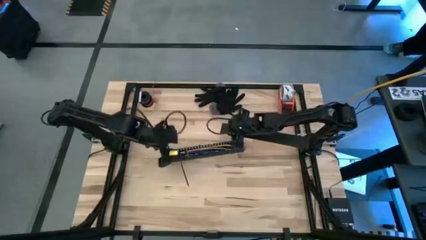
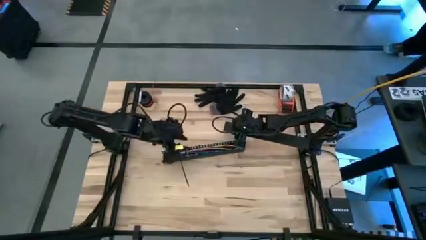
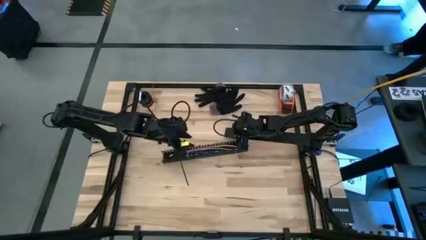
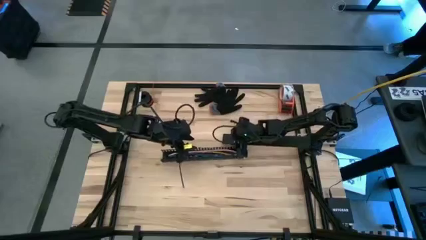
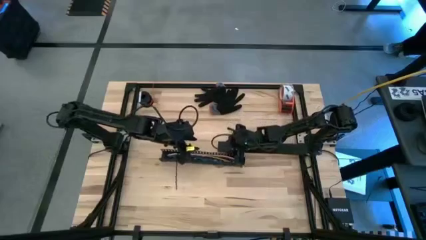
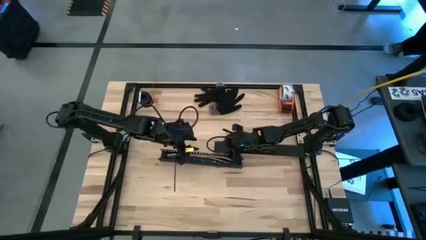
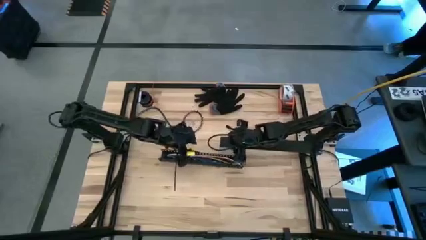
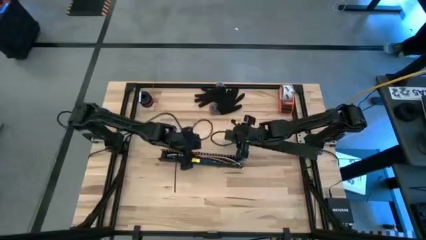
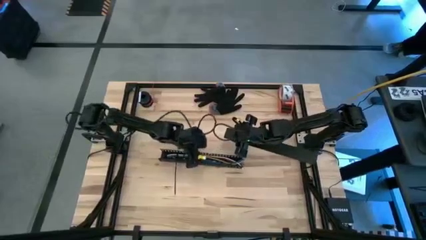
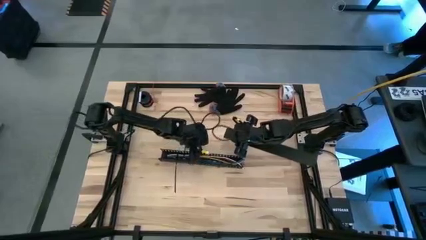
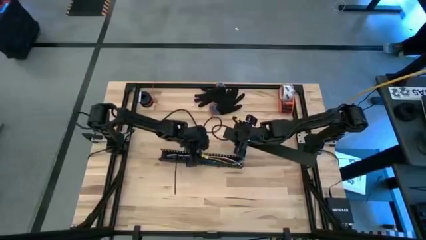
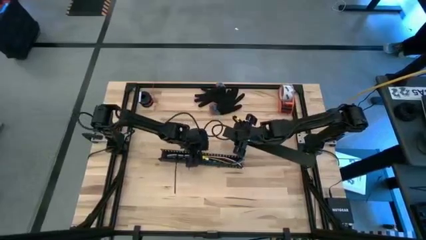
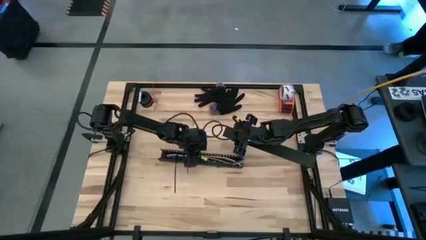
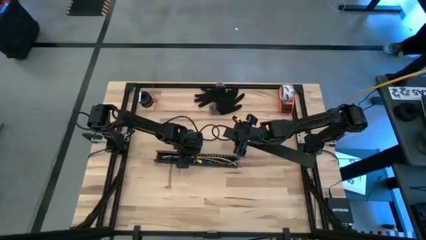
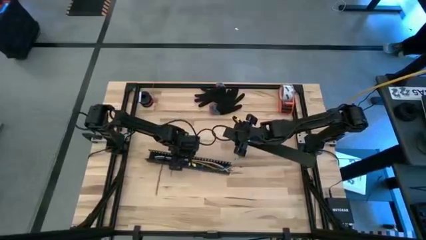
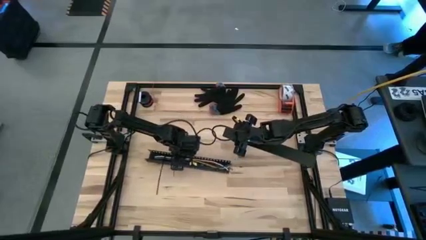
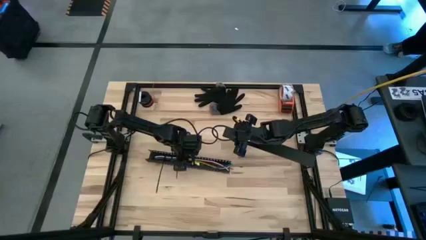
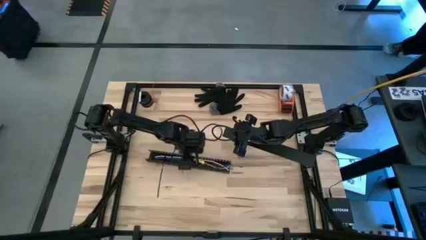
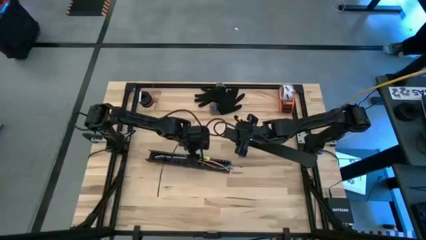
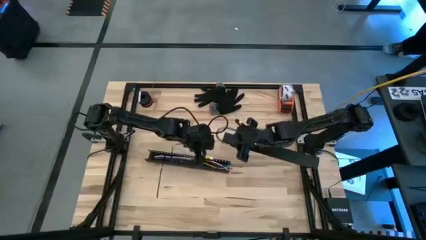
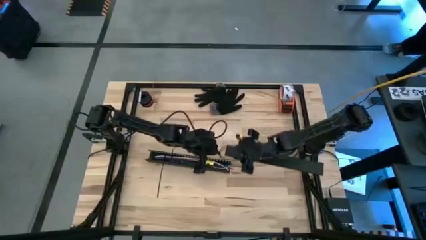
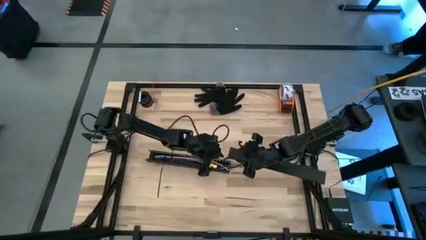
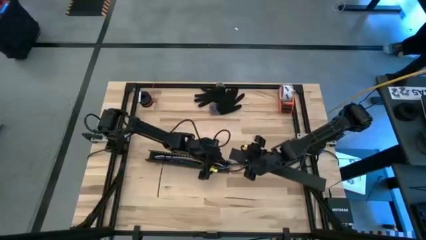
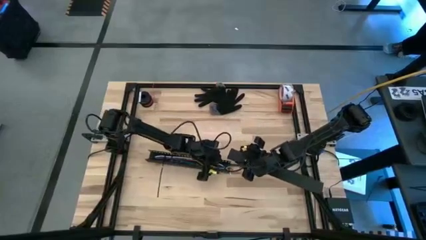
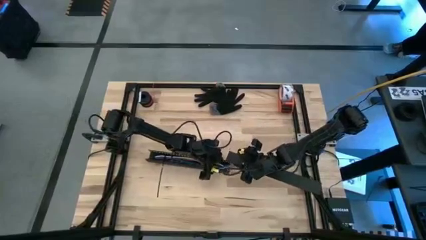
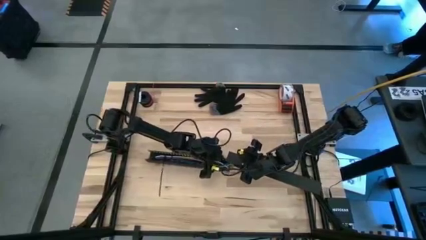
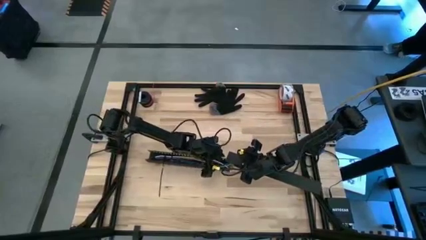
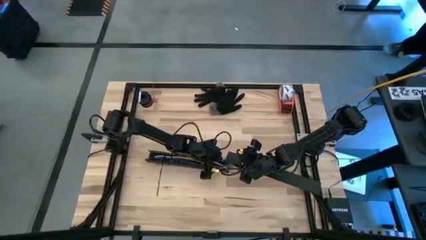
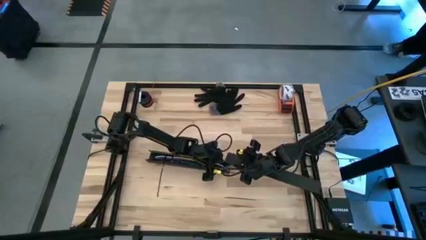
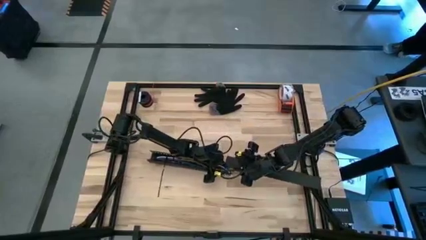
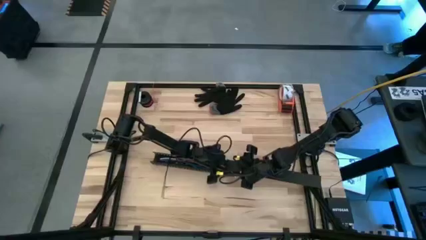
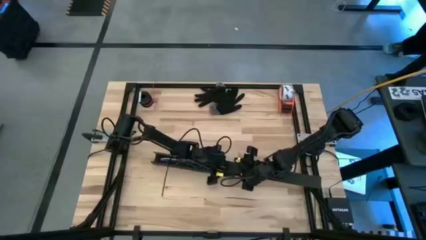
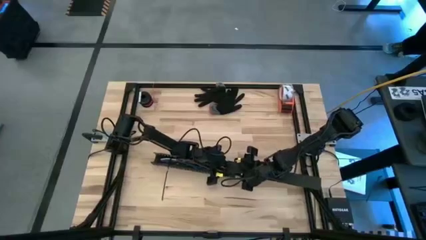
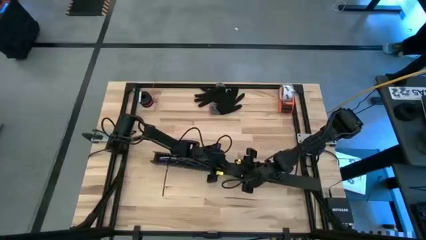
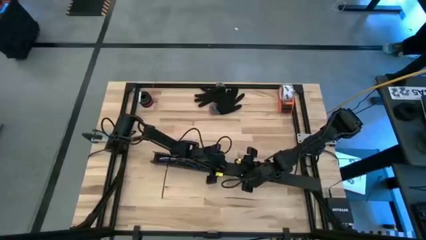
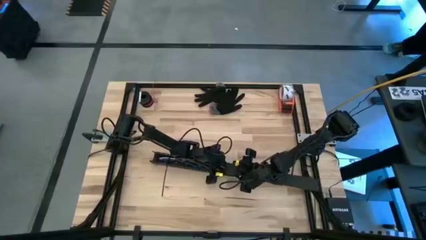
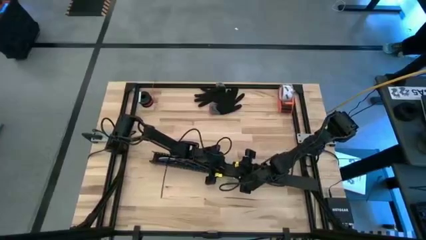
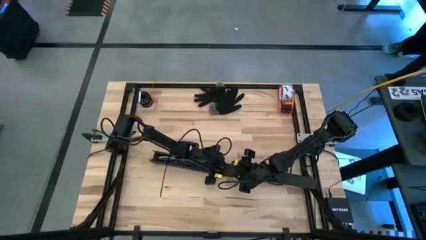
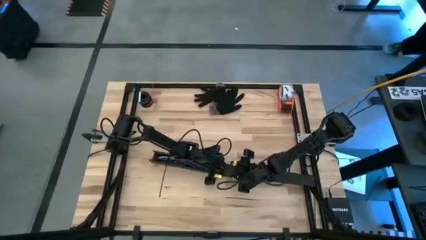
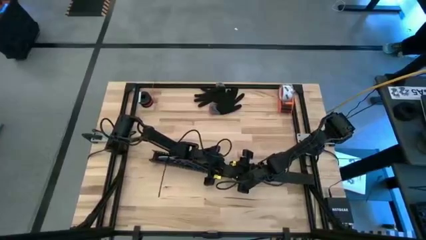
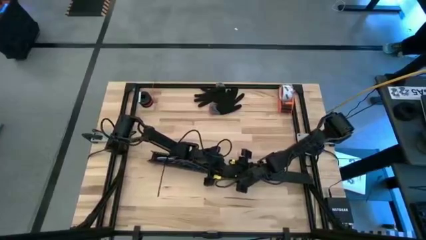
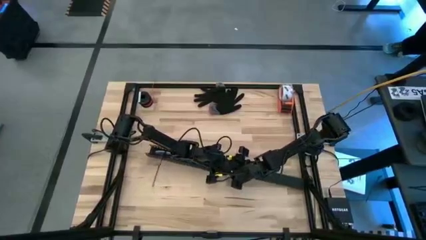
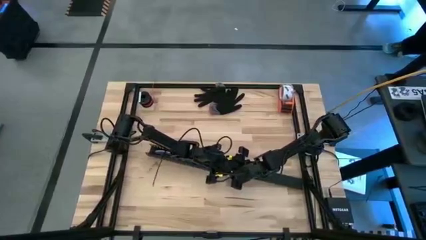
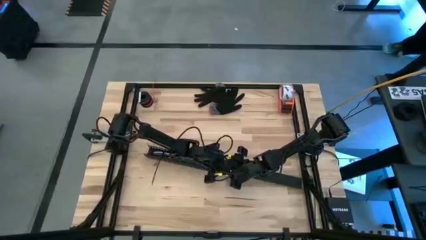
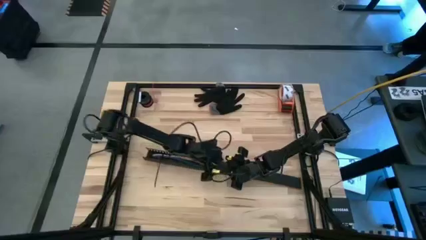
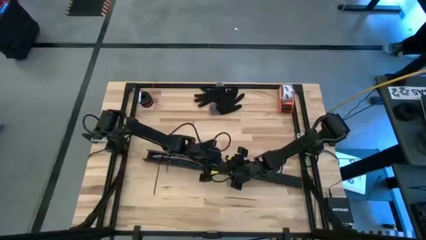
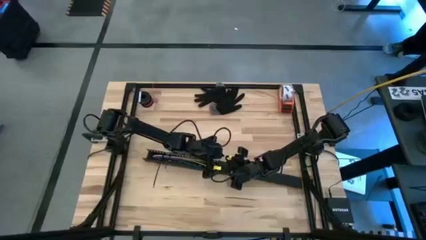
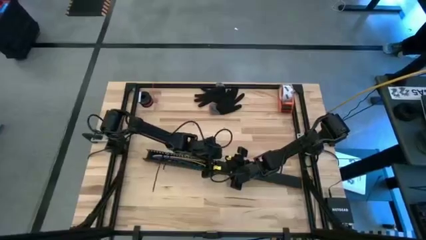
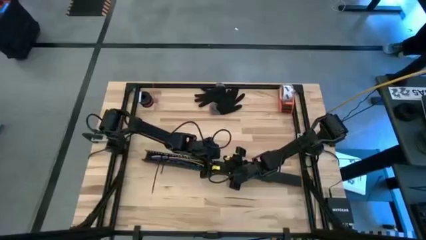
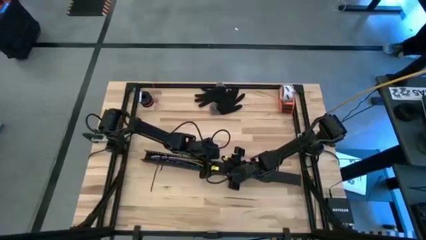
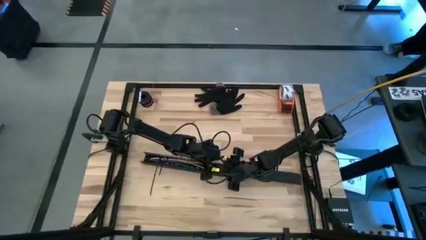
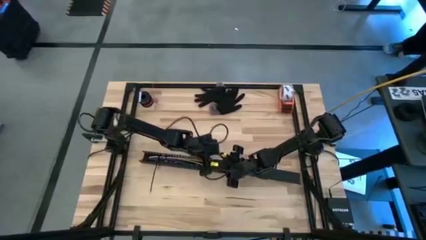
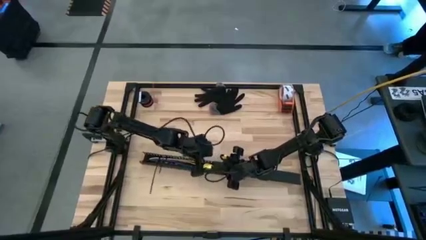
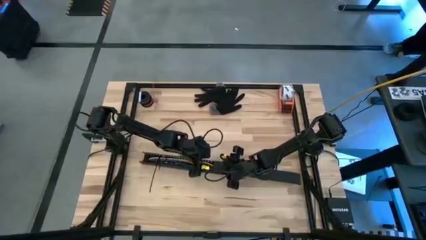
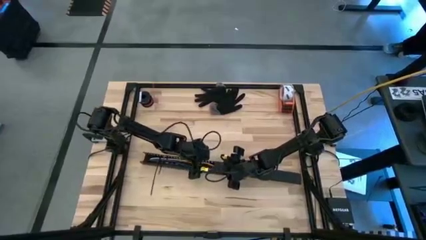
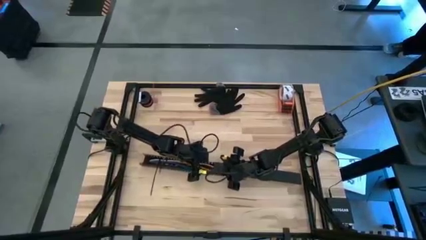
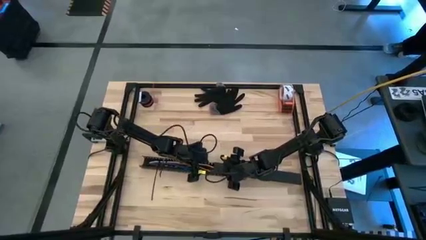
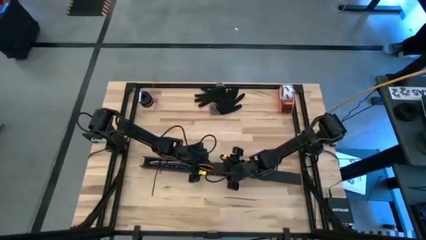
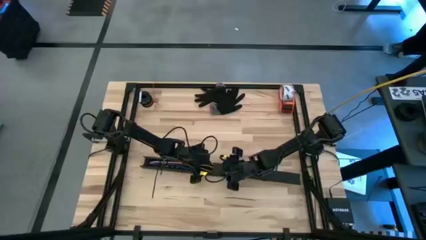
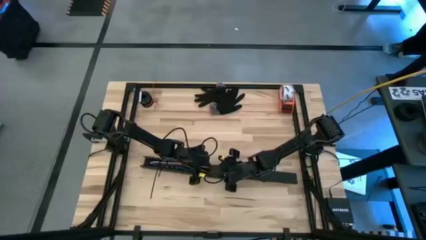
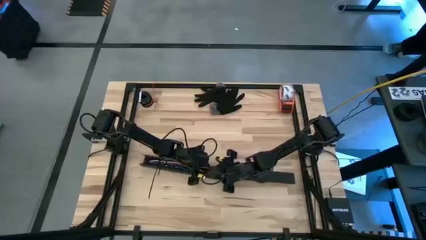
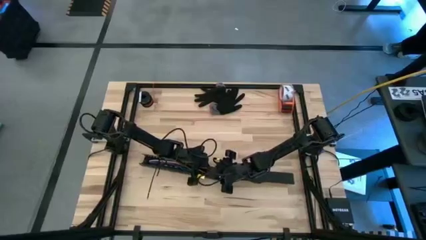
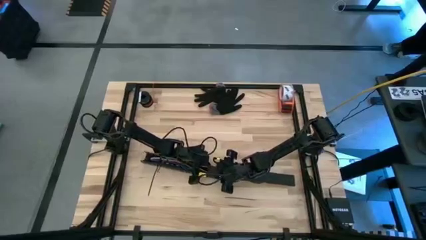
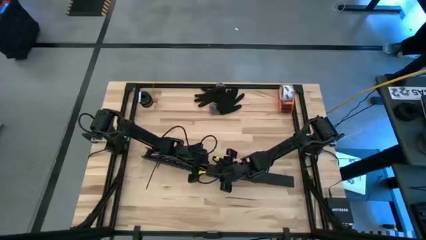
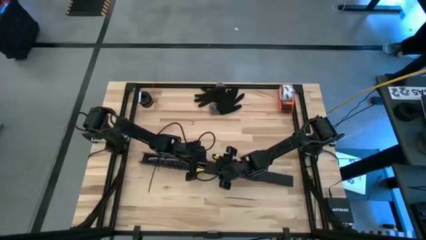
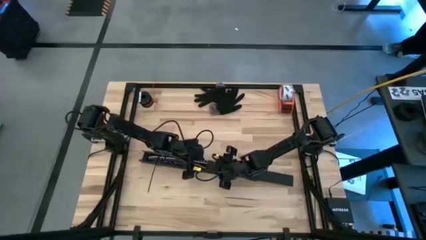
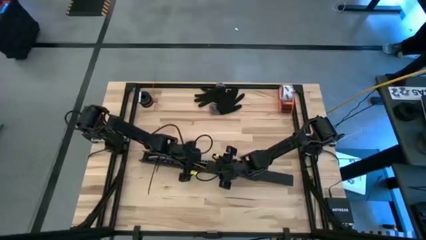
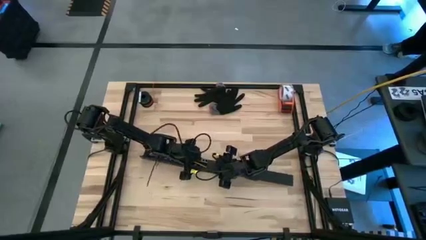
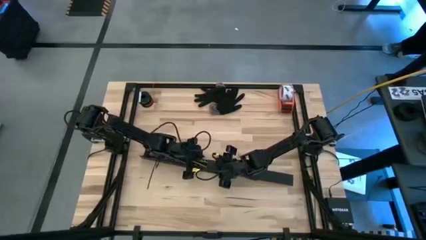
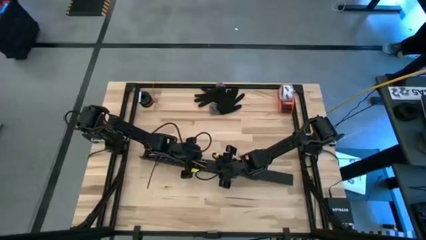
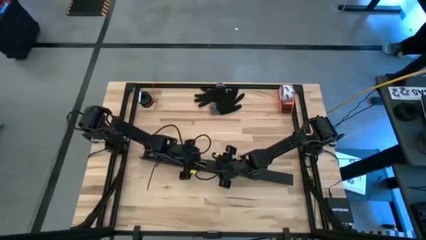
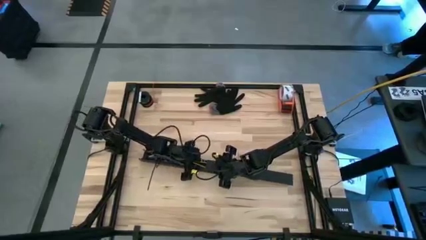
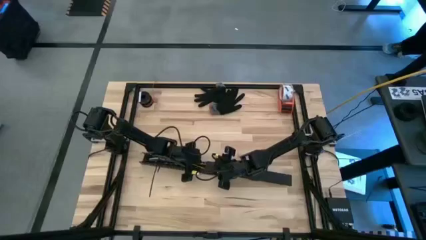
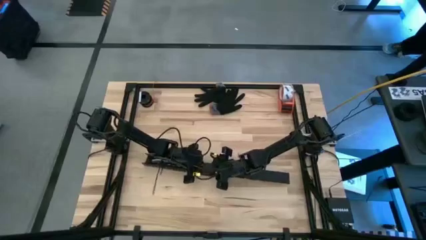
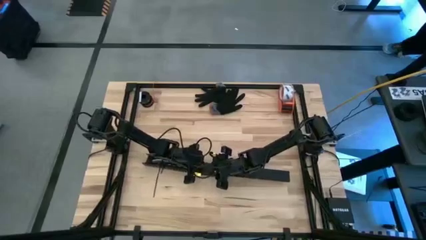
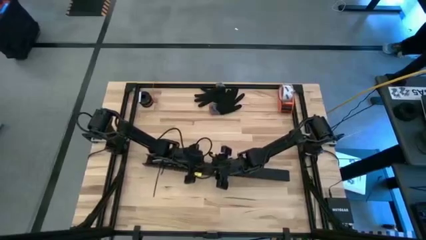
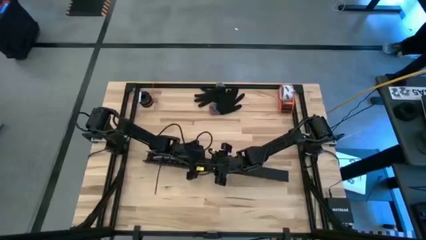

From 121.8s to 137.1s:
Task: Ziptie cables
Close the cable duct

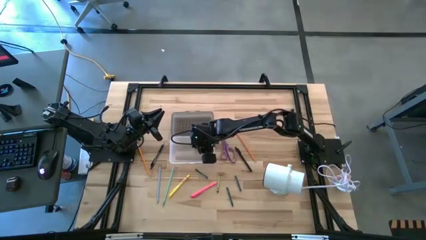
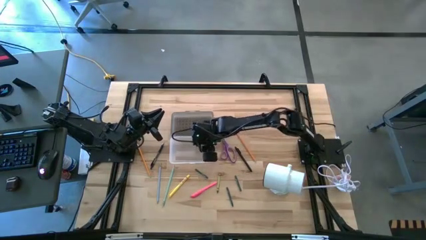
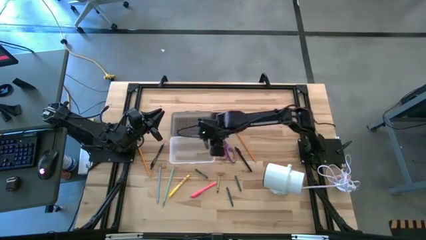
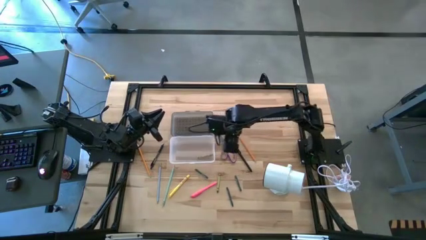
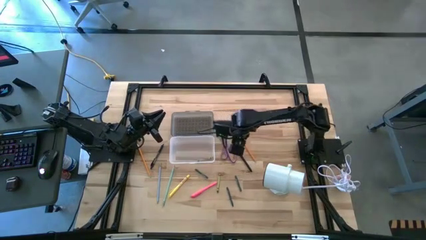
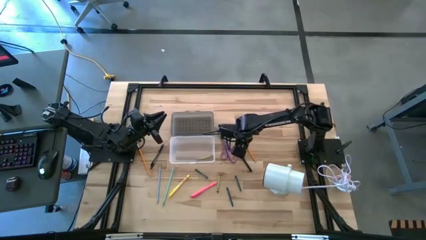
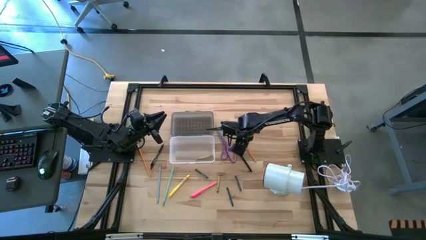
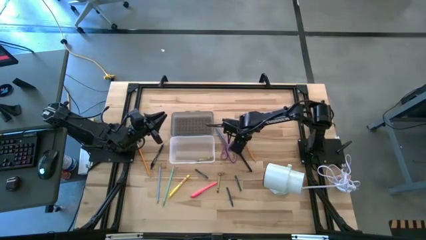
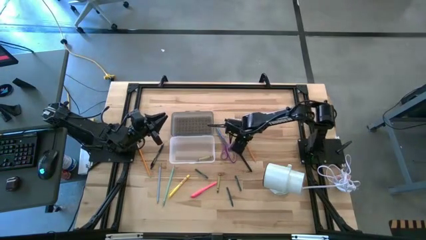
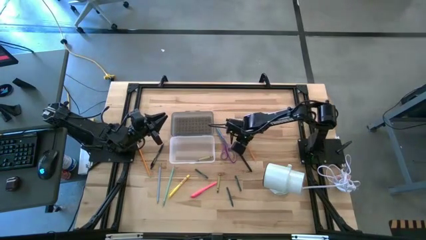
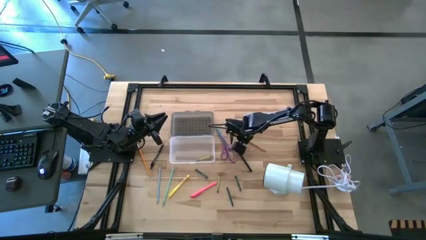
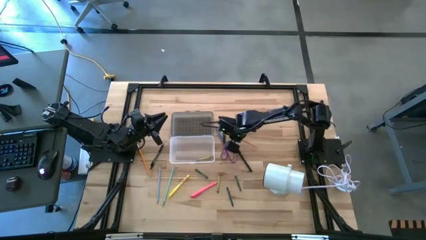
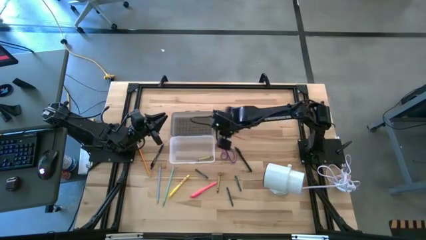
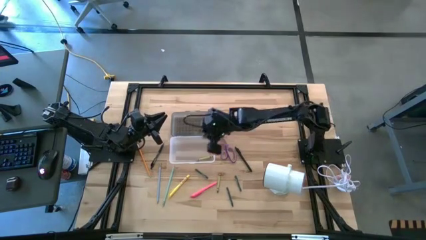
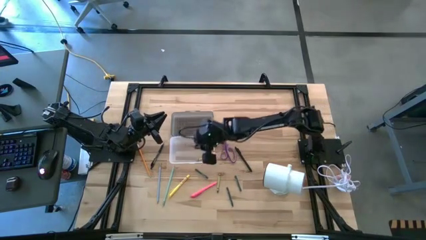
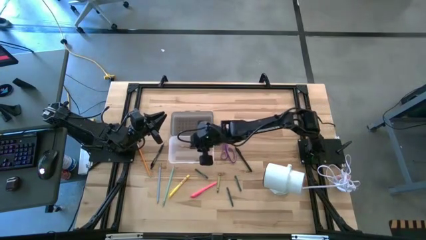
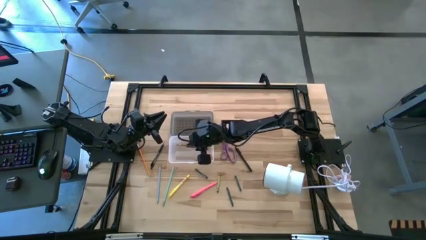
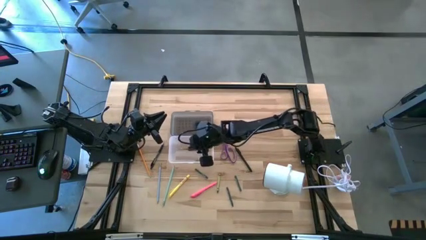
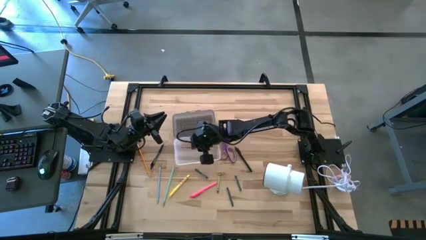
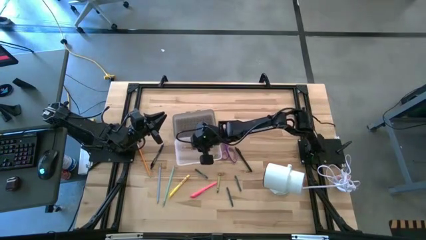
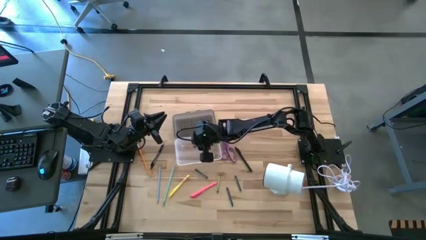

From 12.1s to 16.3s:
Task: Pick & place school supplies into a supply box
Put the orange pencil into the gray supply box
